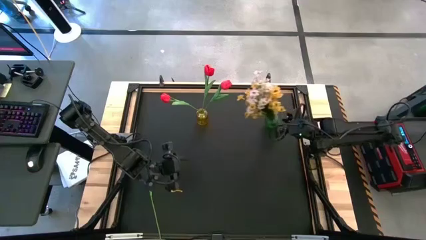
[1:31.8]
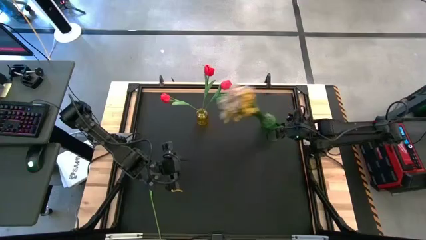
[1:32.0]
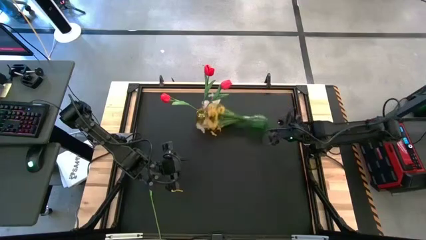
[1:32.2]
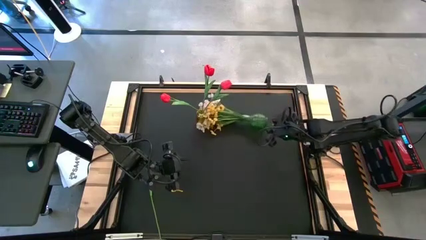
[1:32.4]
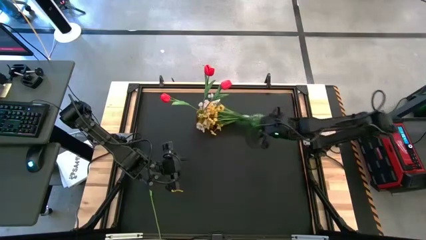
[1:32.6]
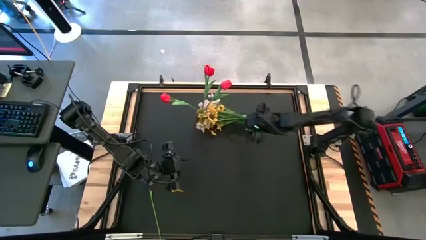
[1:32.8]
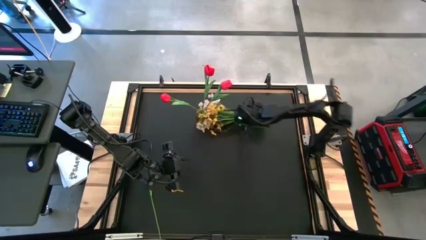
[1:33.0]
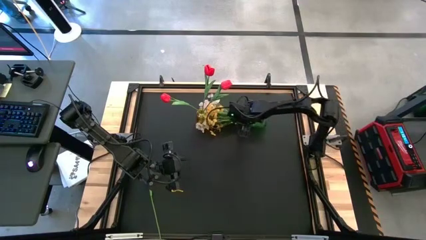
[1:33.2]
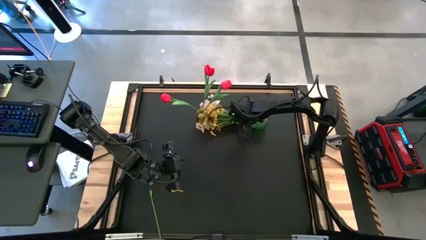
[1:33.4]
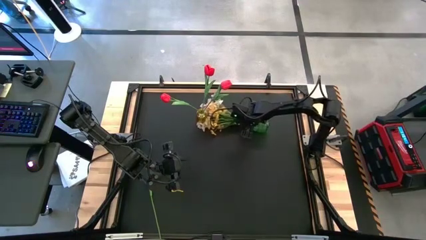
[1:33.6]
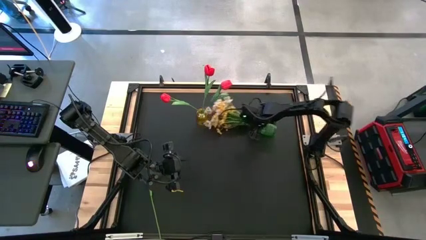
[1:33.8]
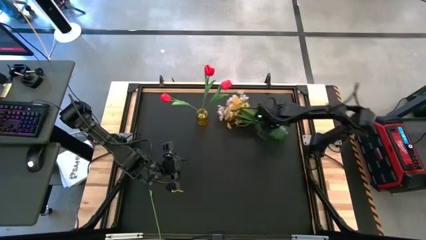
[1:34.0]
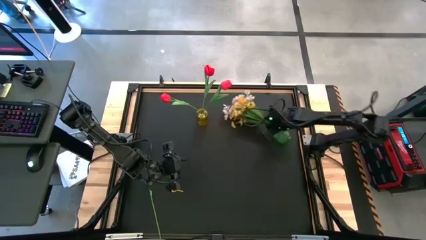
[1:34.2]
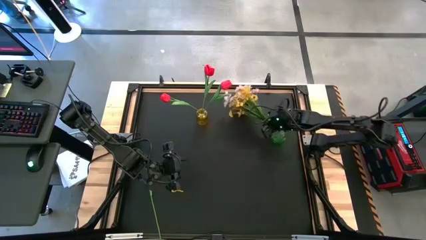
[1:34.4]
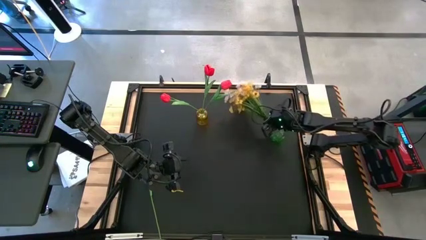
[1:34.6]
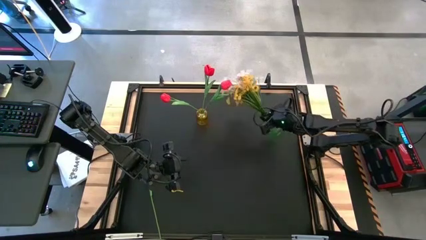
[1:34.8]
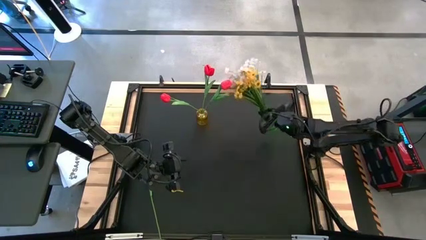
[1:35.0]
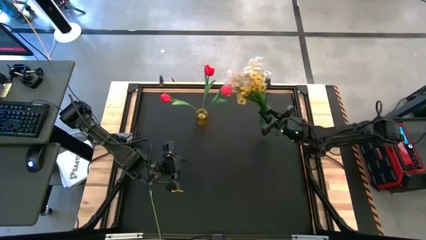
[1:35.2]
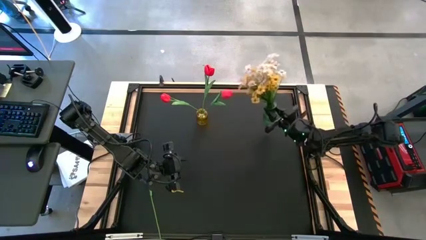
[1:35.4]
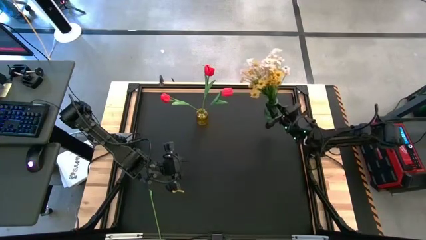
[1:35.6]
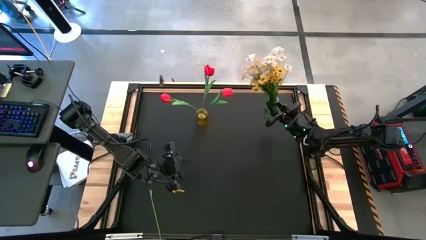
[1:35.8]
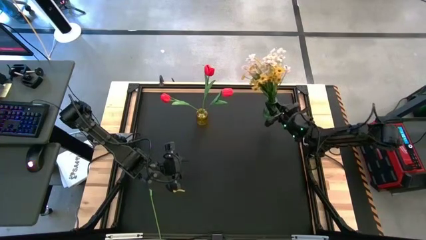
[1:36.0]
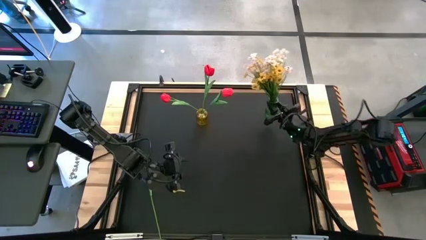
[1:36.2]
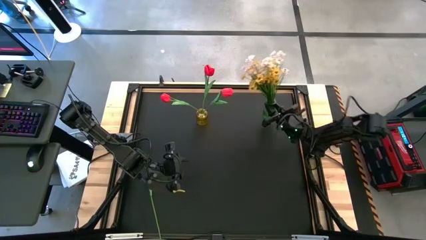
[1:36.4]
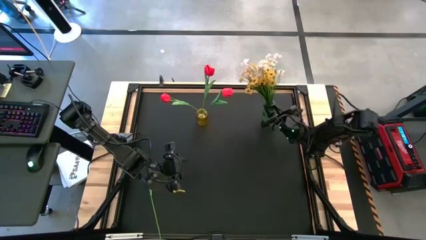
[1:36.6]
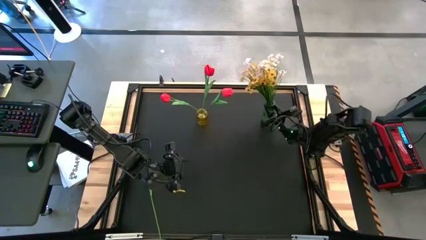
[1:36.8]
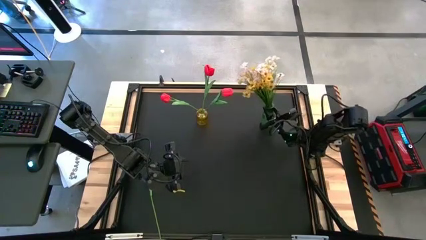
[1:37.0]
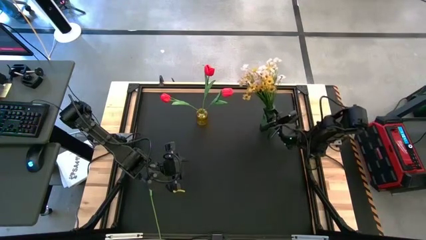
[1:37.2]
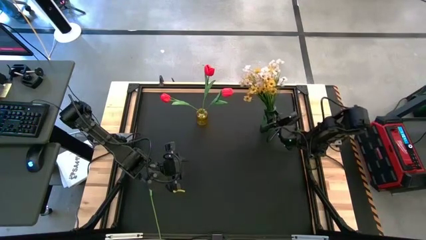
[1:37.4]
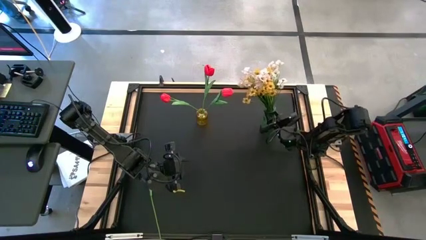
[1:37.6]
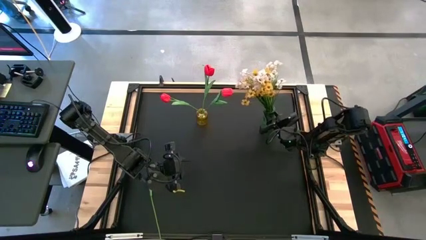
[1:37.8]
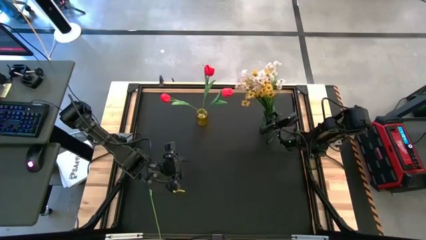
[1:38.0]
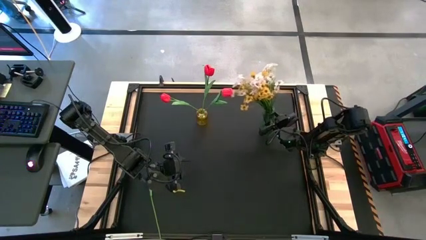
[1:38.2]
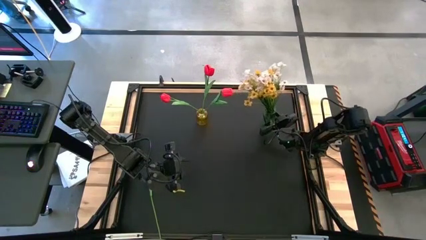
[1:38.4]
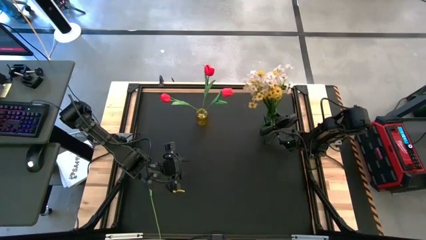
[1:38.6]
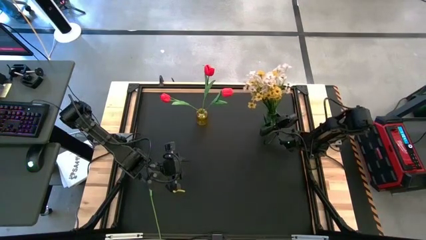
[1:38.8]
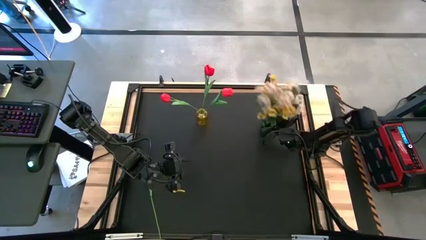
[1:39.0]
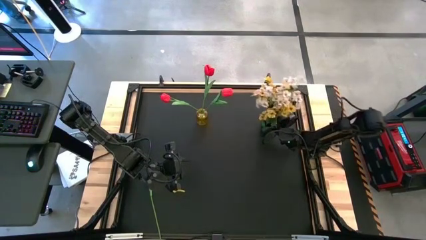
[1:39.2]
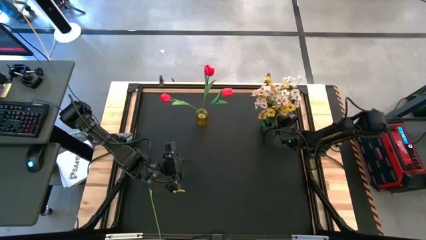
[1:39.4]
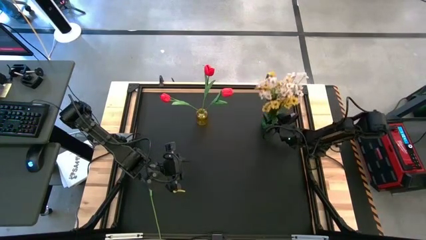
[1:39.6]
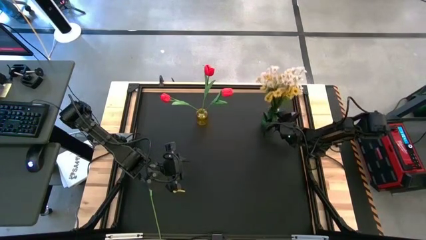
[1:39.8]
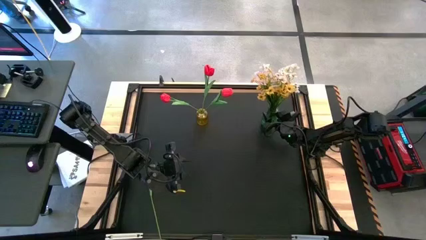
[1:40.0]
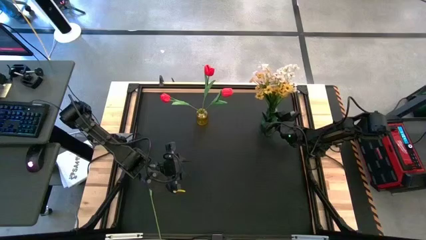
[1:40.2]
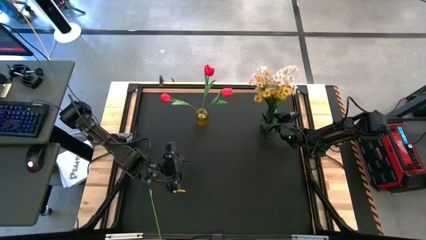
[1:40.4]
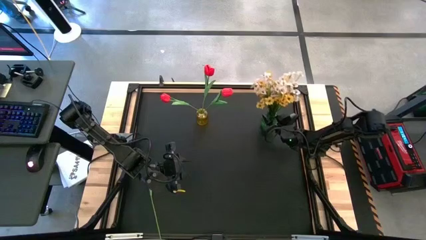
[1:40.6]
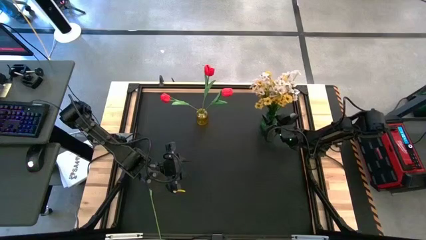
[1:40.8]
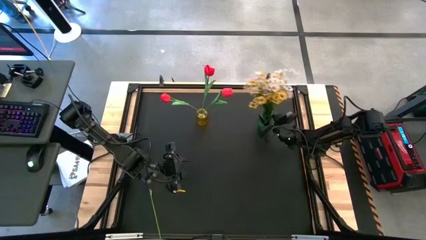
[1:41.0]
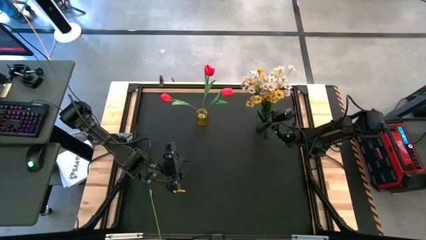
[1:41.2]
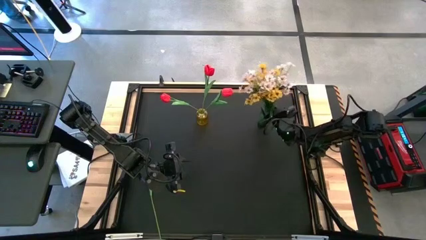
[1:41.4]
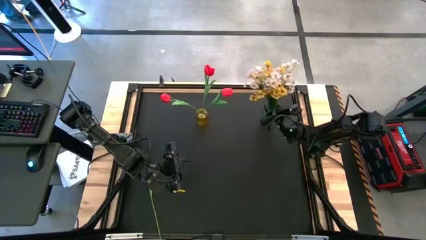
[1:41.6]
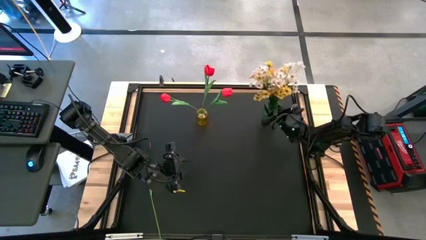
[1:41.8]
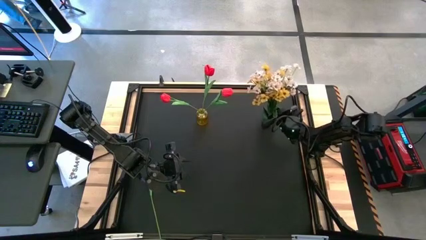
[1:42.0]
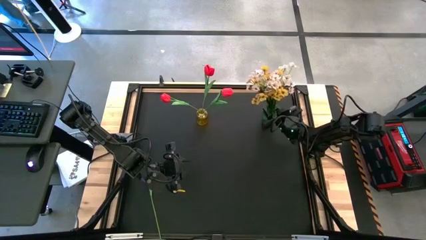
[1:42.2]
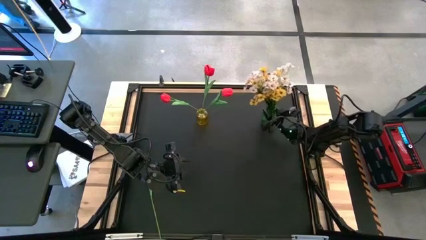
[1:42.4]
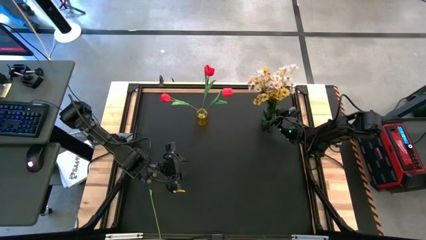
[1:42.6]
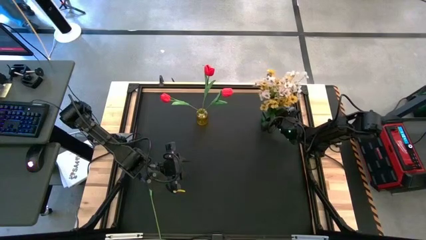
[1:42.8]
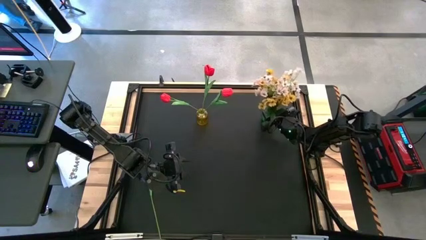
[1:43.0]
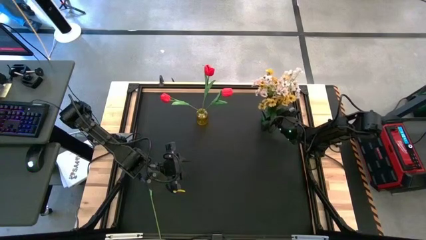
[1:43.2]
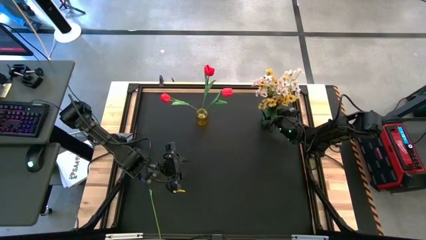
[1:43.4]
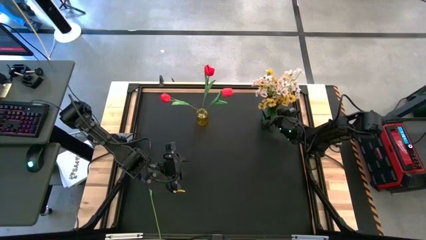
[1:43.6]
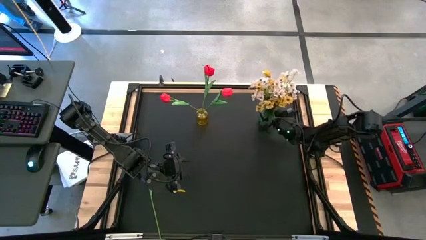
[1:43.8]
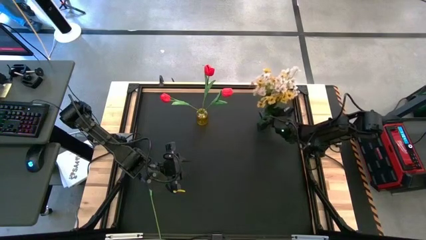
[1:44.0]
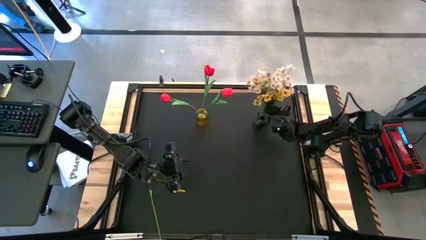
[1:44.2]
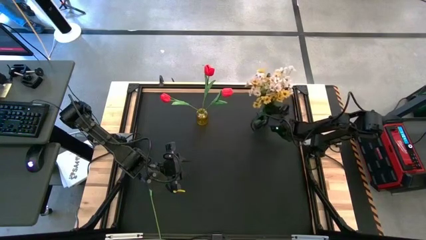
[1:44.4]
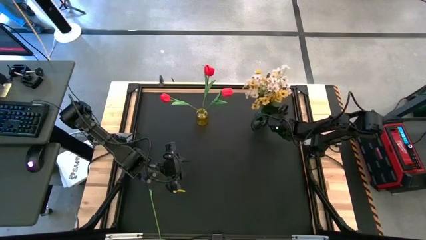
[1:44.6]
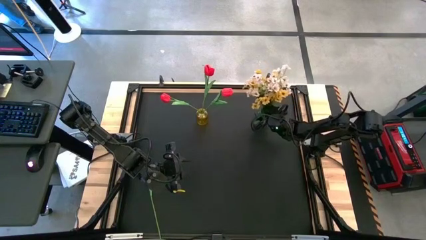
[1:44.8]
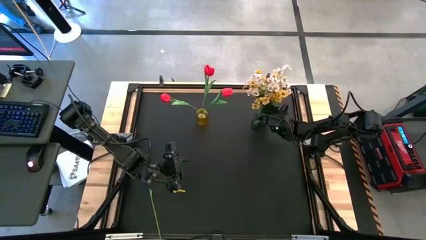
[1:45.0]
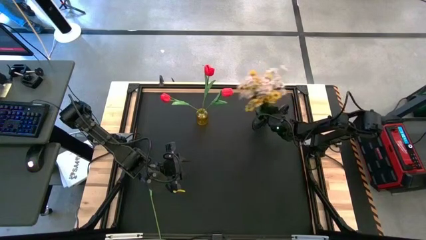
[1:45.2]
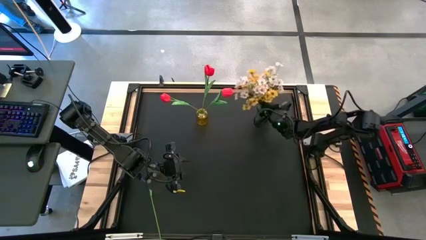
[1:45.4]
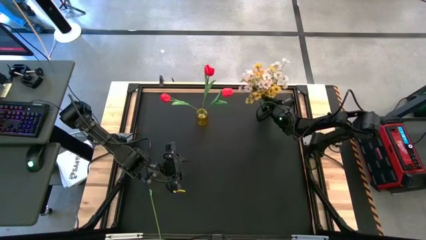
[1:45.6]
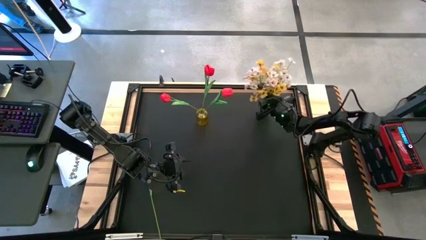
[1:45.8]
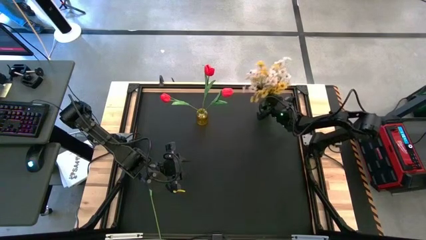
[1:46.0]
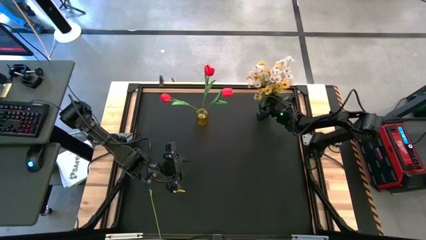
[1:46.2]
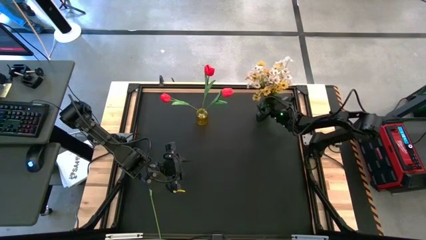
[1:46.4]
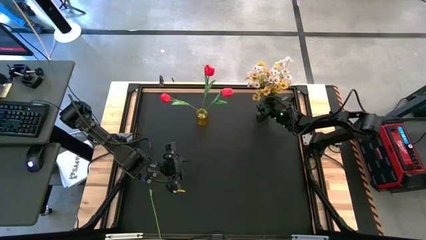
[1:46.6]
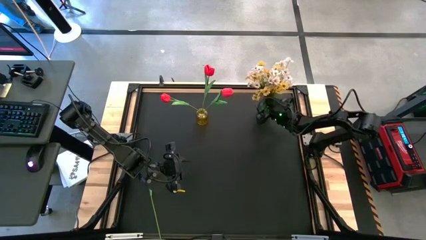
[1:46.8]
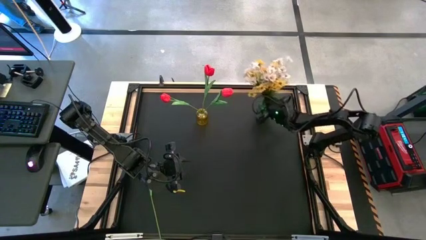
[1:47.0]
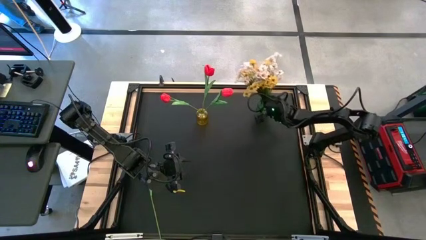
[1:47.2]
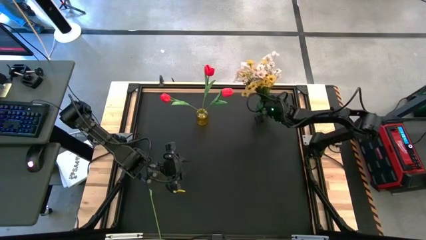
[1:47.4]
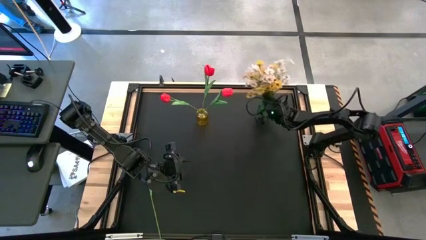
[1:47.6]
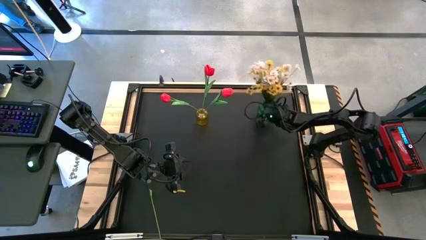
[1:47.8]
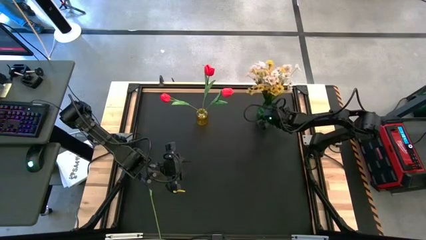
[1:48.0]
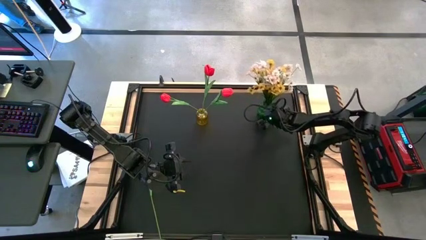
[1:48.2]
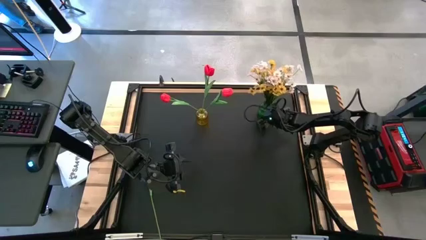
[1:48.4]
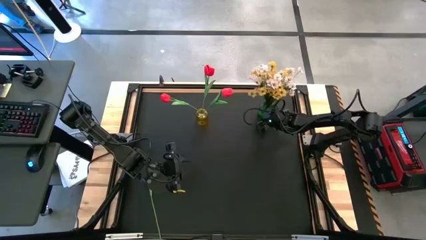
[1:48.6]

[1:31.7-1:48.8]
Task: Sort flowers into vase by color
Adjust the green vase
